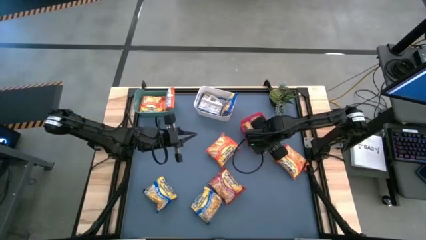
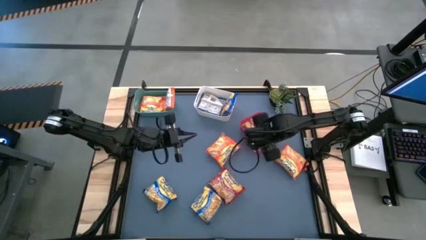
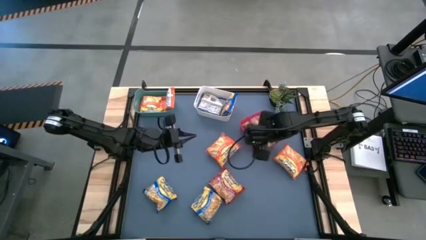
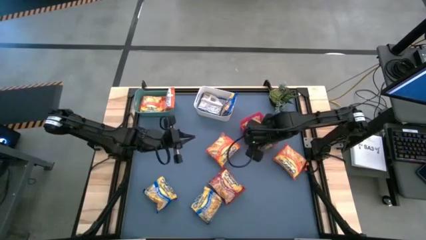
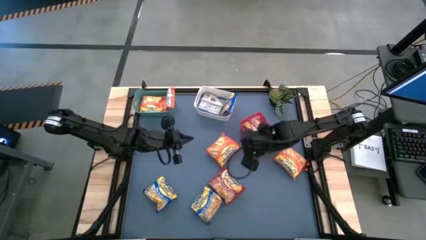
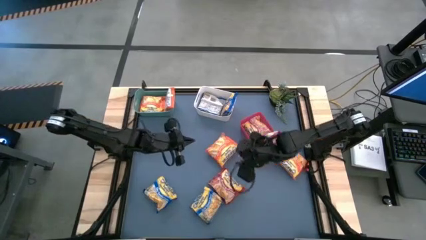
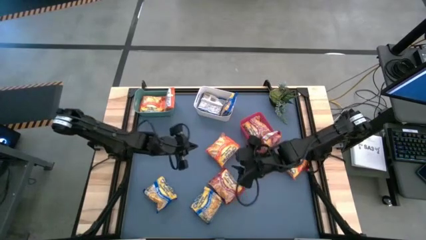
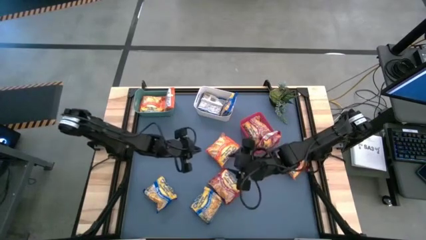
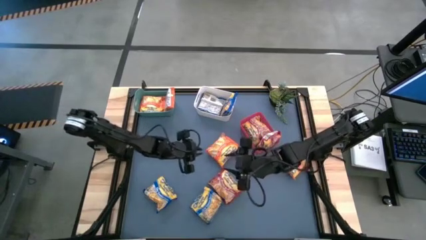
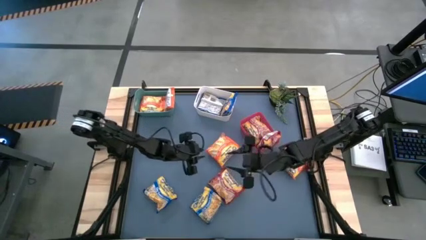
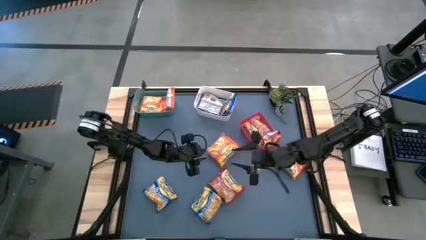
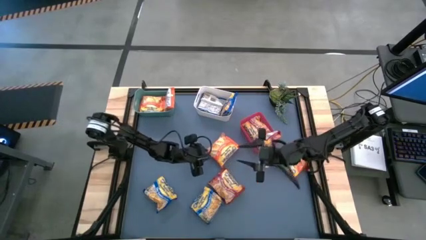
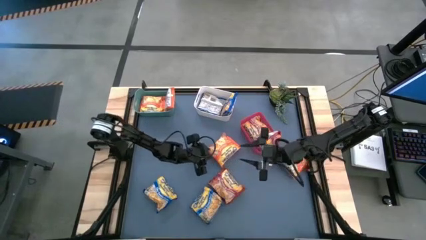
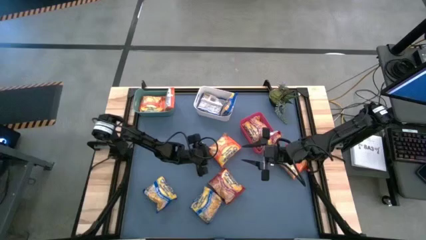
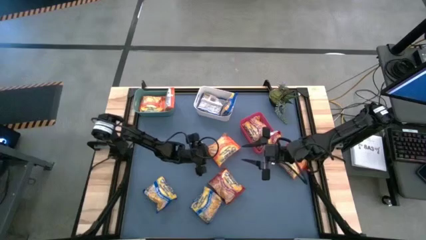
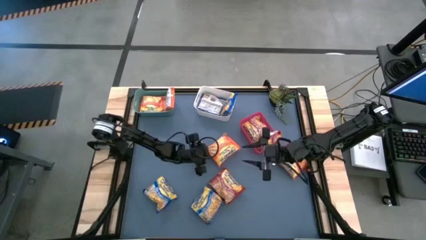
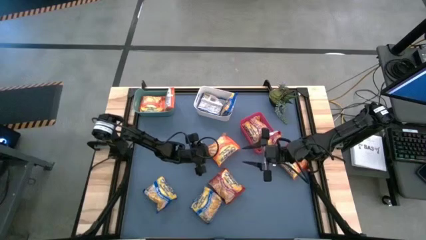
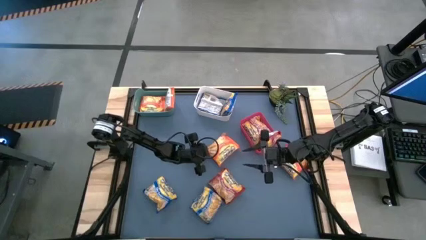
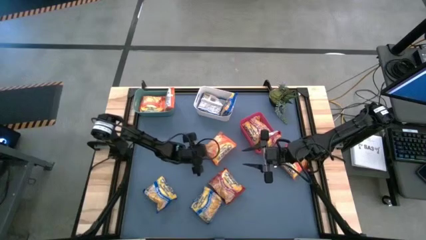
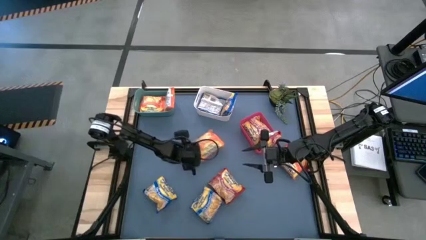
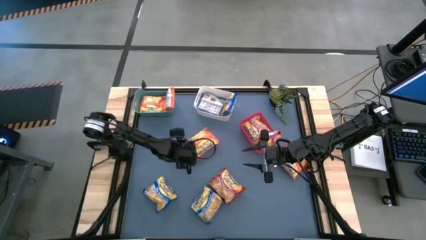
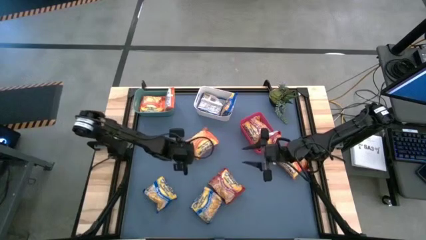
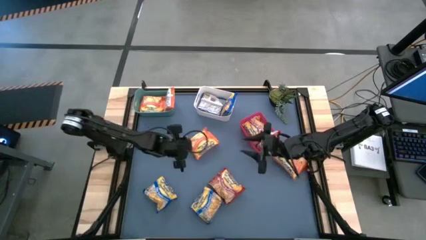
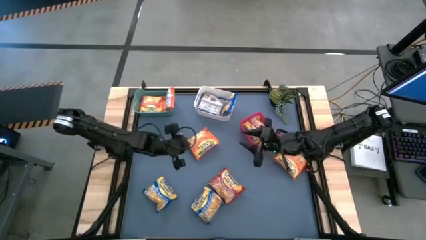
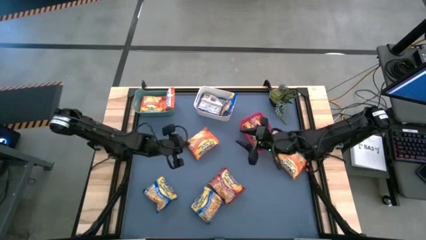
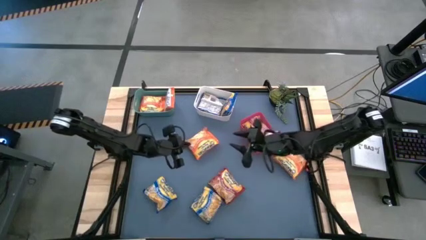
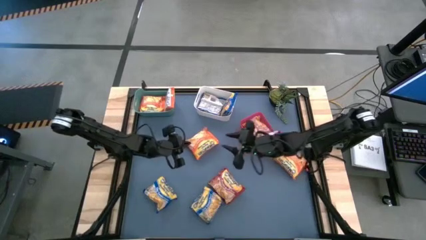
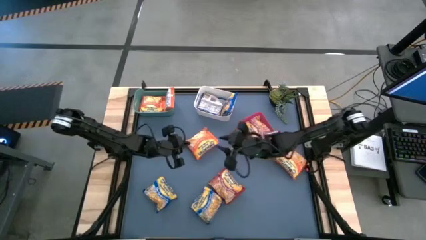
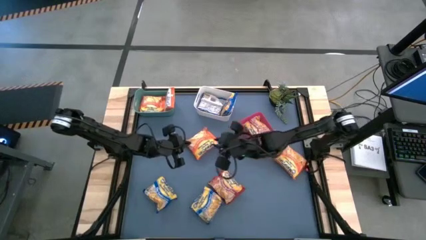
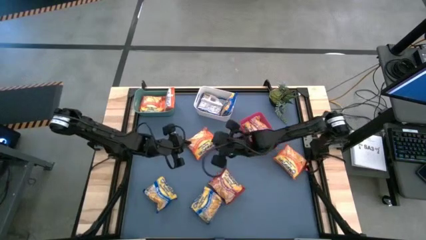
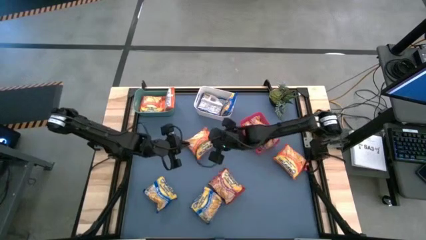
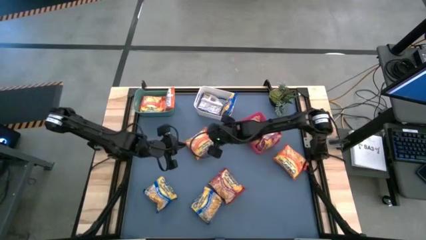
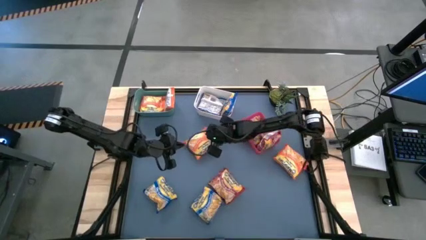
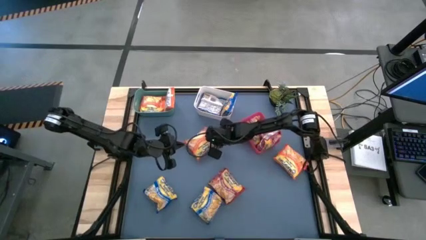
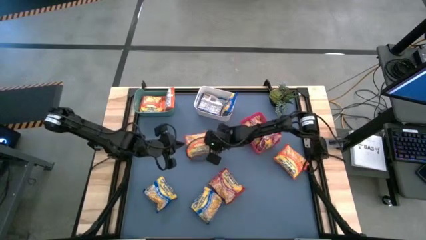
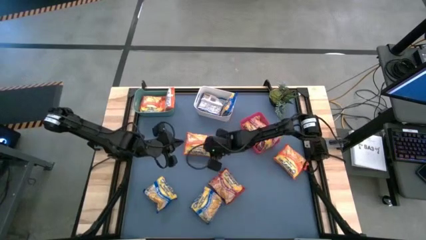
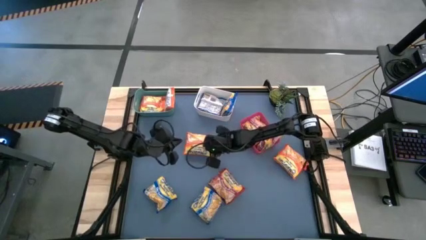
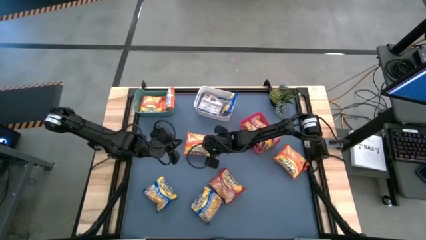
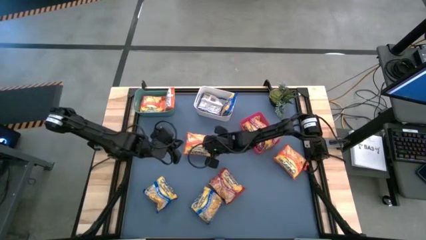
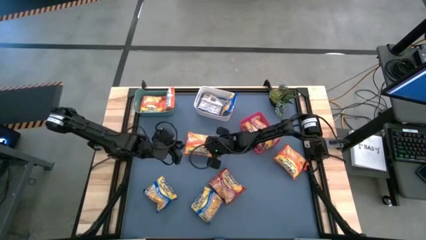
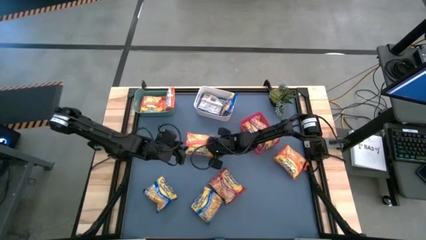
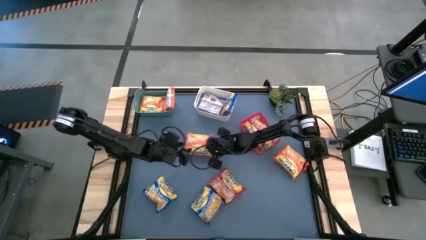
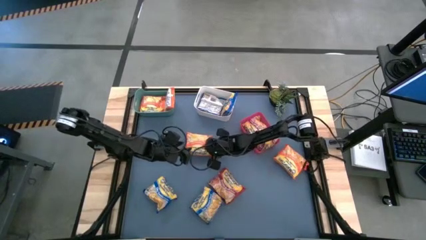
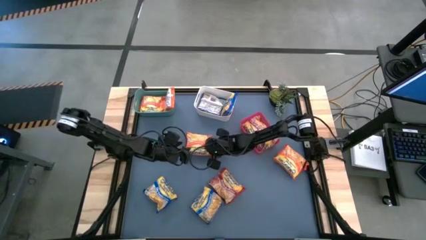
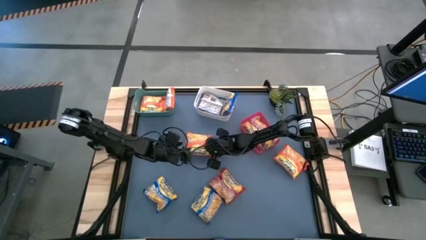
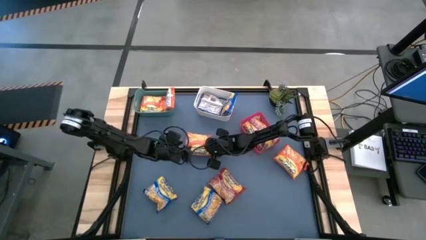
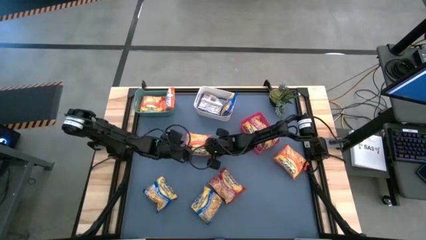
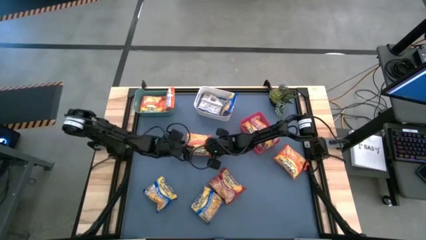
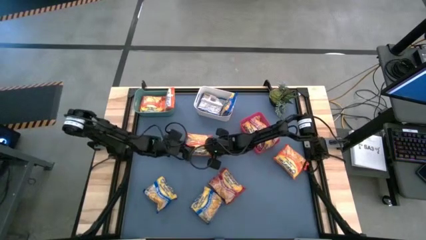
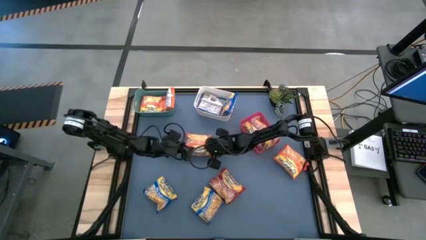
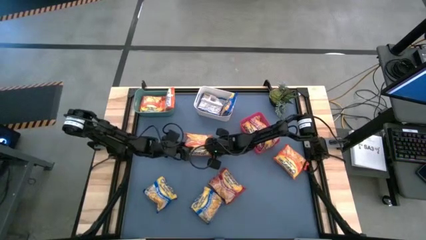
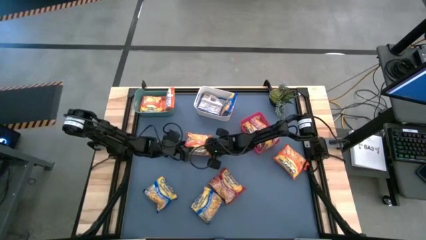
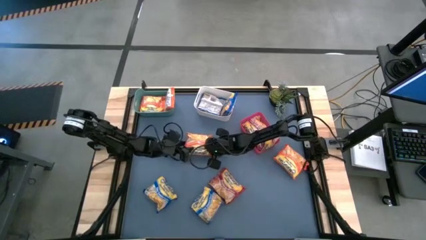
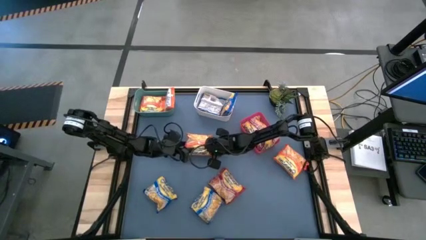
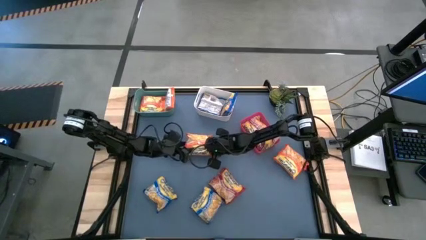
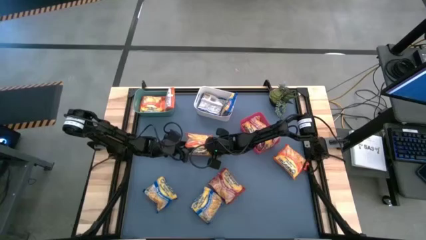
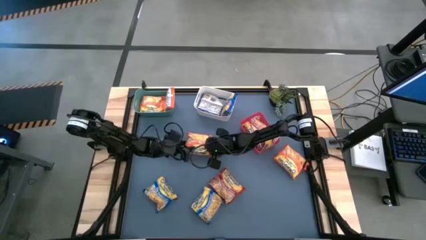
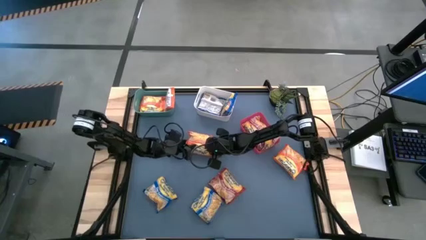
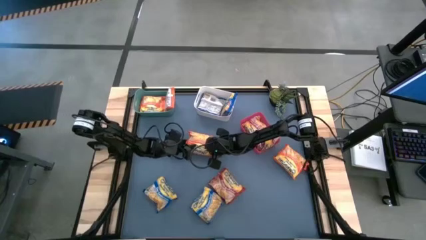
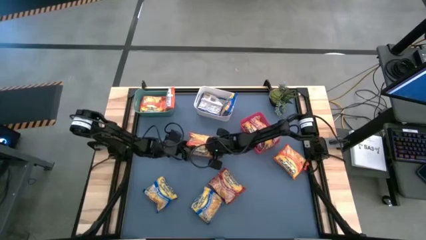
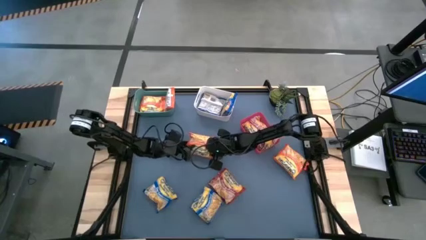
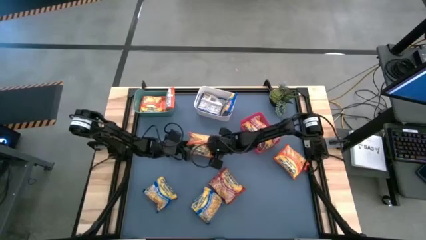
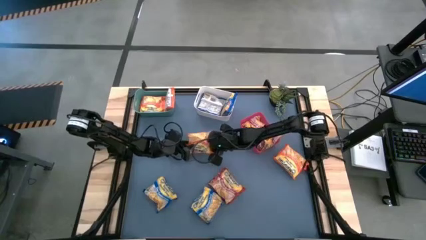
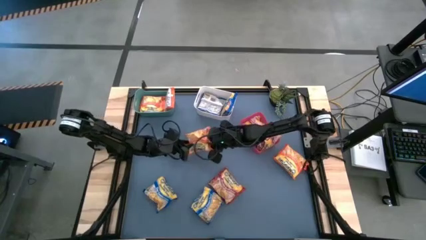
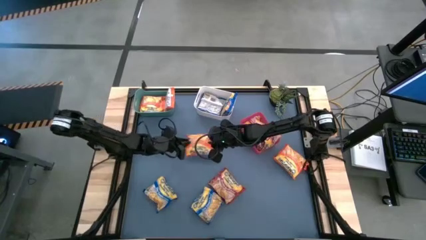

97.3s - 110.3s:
Task: Sort Maruchan noodles
Put the orange noodle pack into the green bin

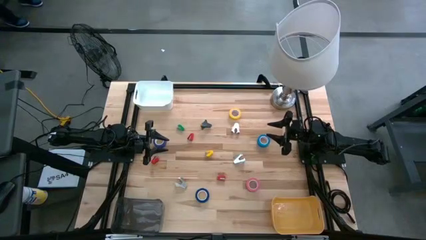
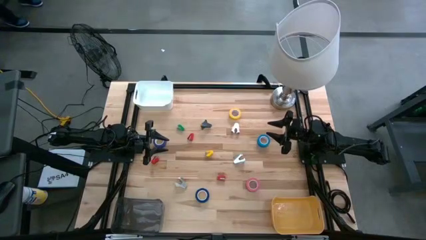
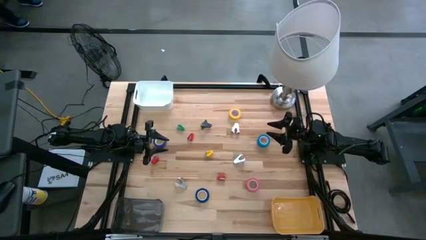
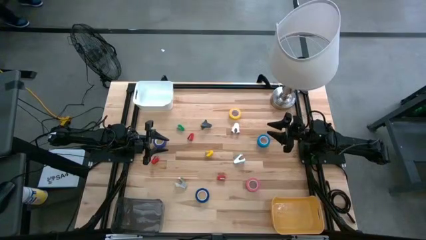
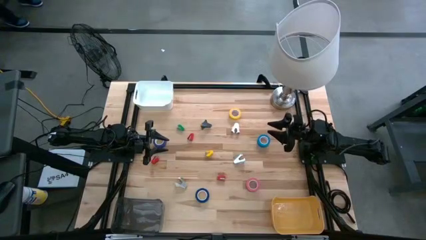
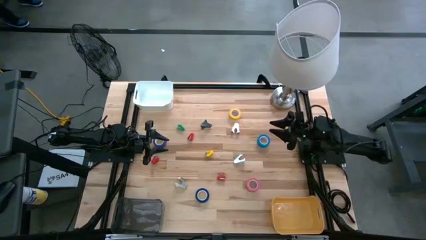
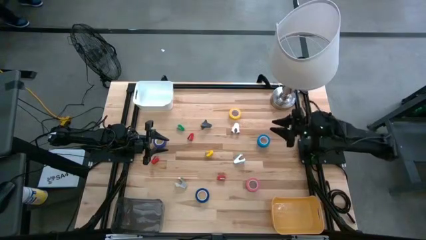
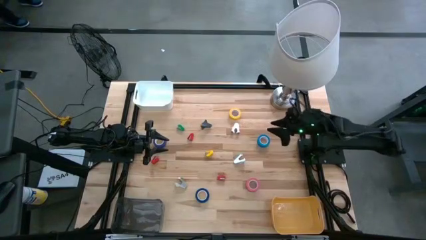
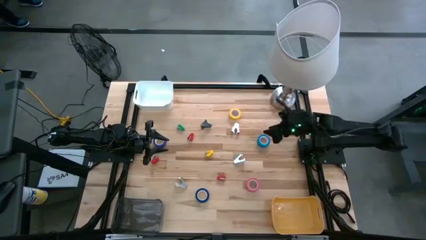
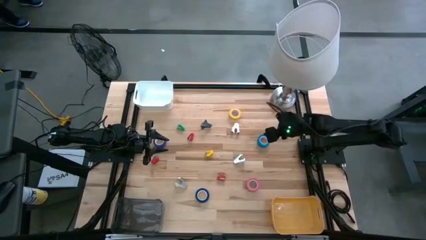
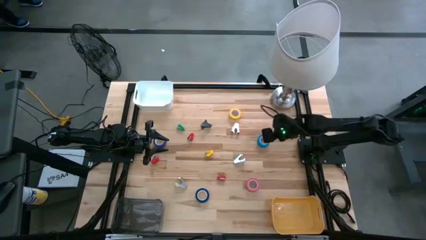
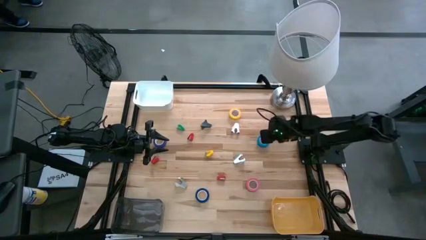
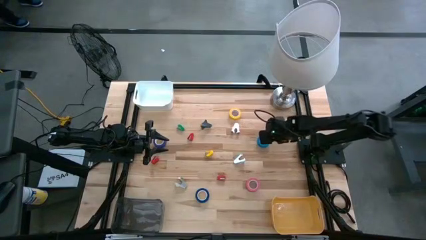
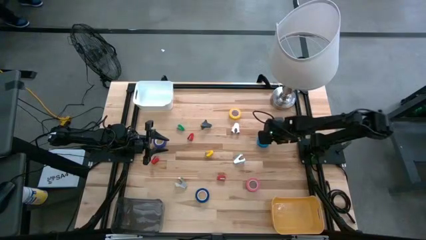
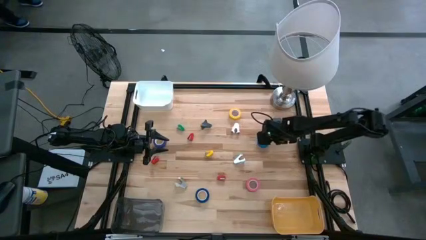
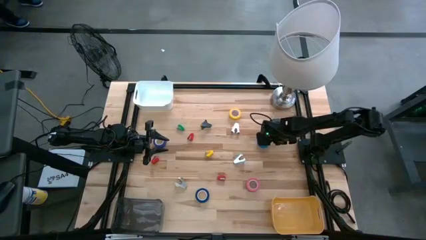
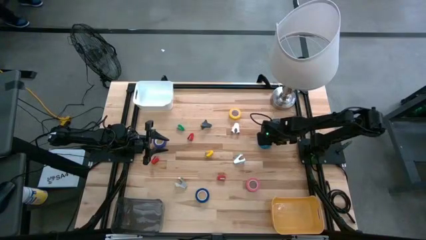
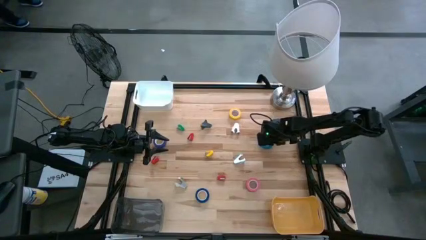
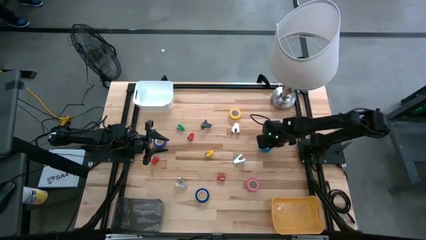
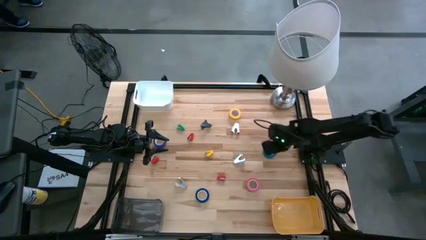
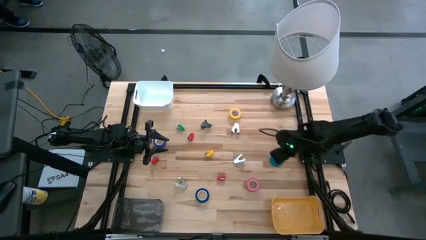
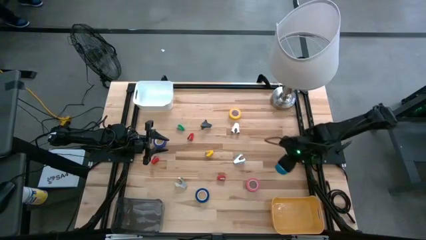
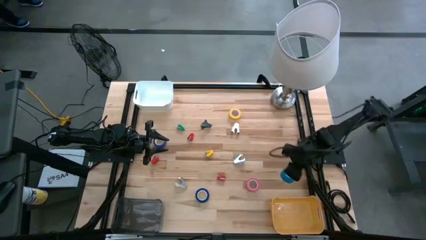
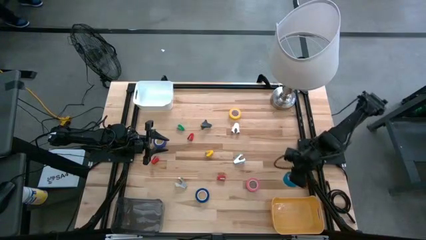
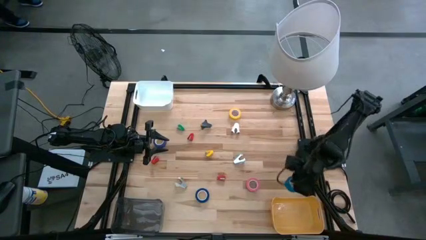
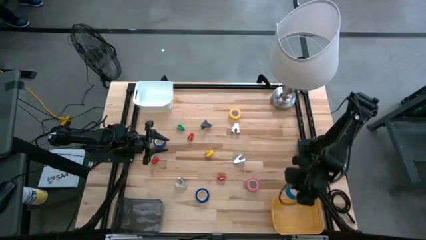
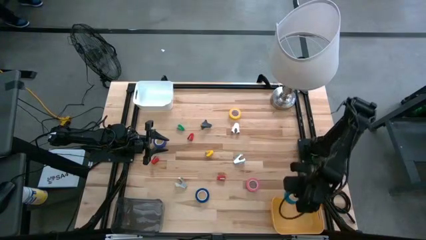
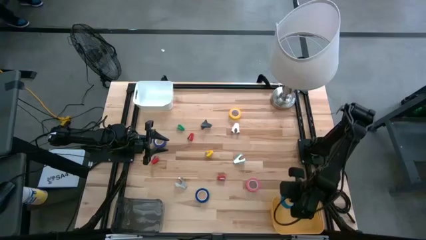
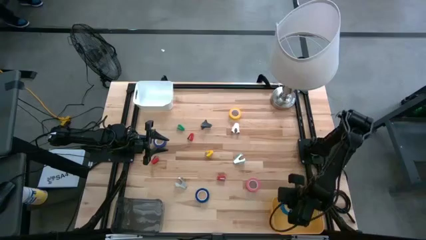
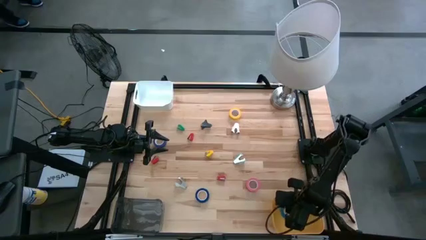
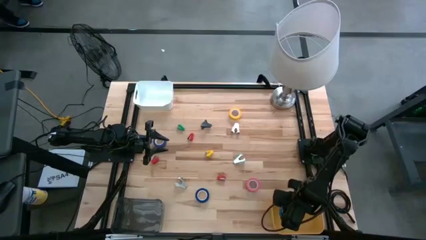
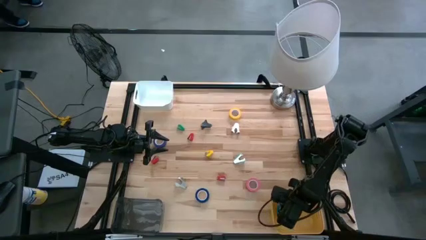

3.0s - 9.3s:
Task: Pick and place Stapler, Stapler remover, tape
Put the blue tape into the yellow bin
